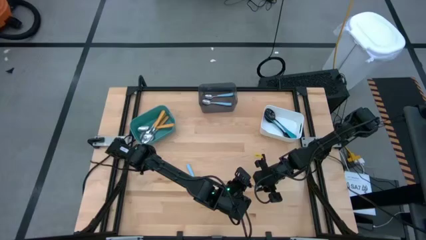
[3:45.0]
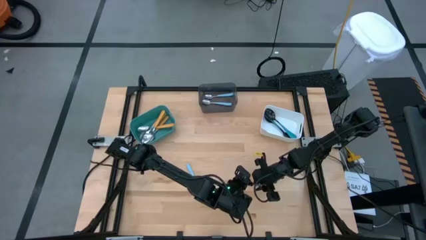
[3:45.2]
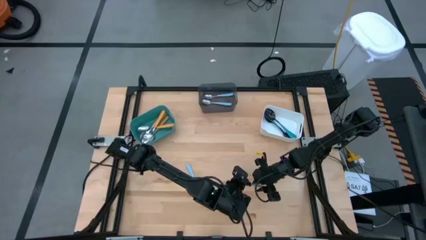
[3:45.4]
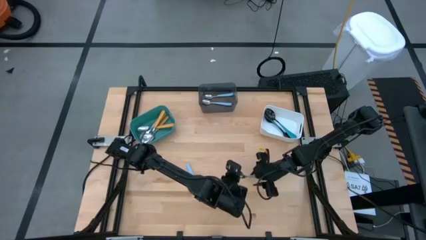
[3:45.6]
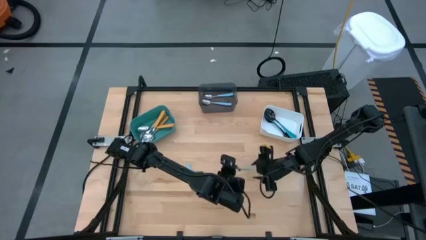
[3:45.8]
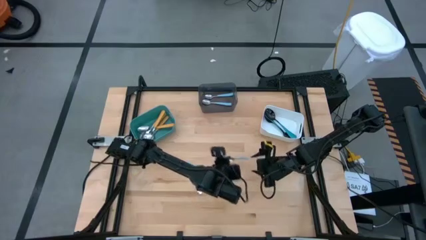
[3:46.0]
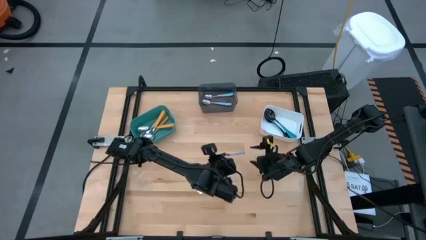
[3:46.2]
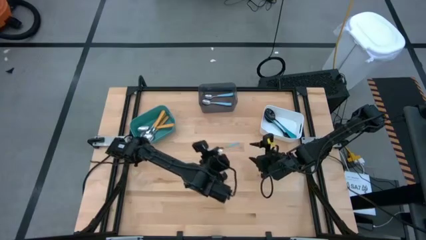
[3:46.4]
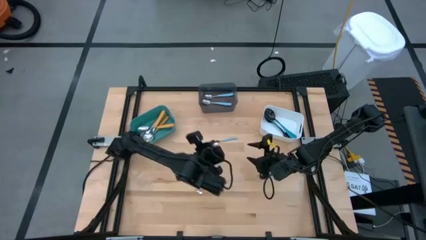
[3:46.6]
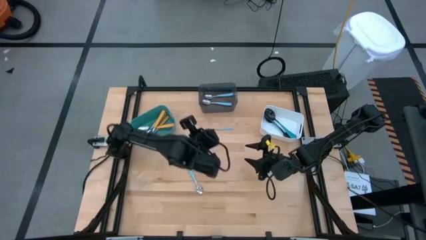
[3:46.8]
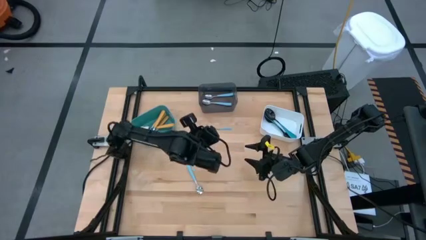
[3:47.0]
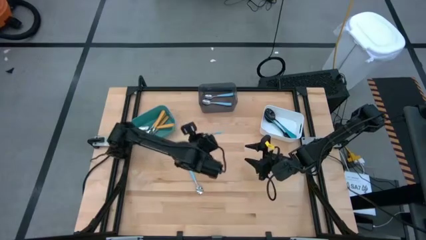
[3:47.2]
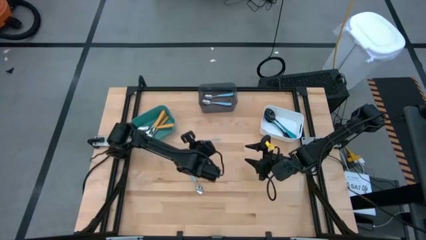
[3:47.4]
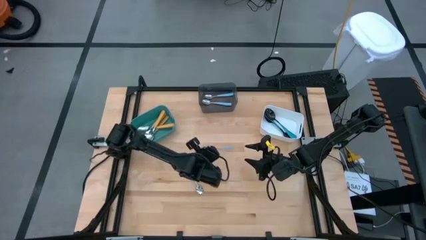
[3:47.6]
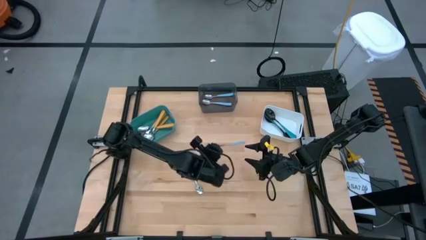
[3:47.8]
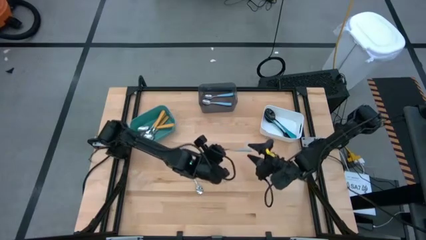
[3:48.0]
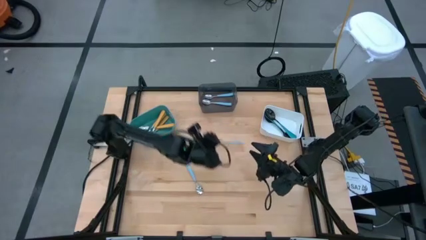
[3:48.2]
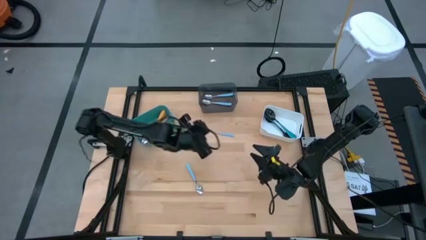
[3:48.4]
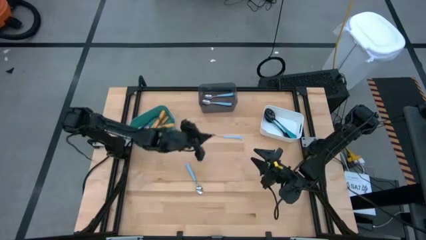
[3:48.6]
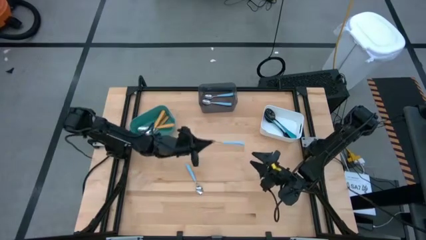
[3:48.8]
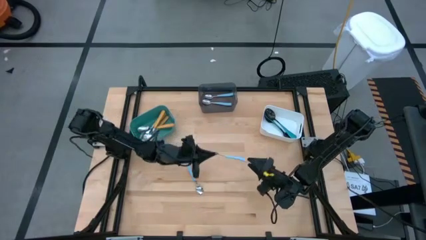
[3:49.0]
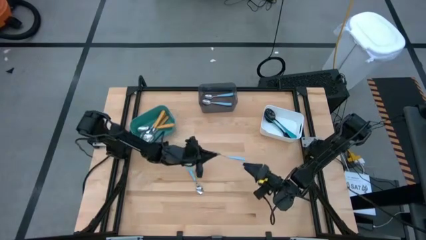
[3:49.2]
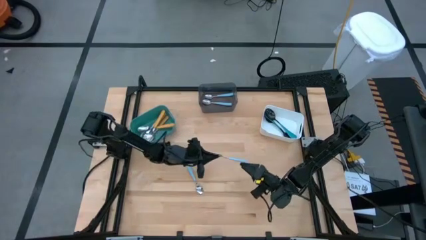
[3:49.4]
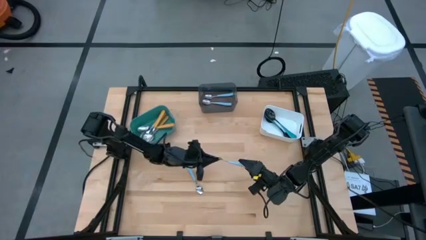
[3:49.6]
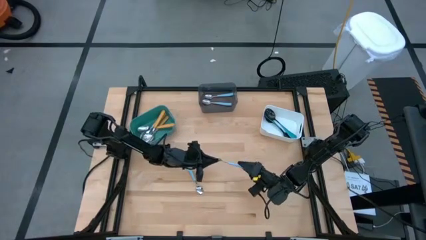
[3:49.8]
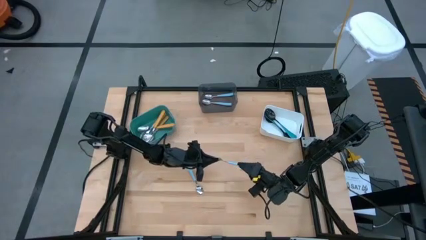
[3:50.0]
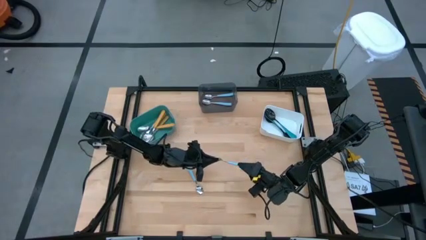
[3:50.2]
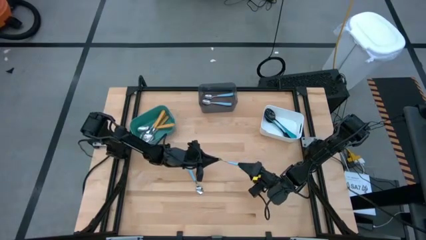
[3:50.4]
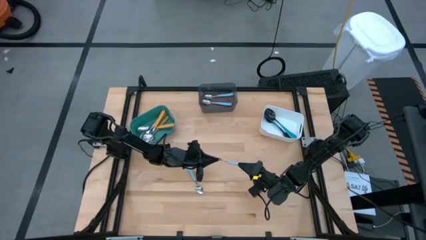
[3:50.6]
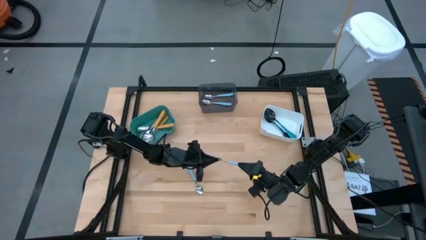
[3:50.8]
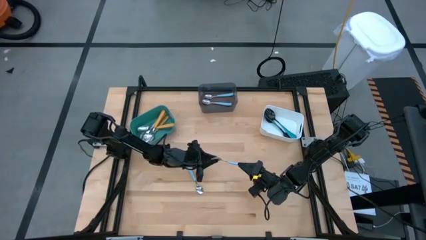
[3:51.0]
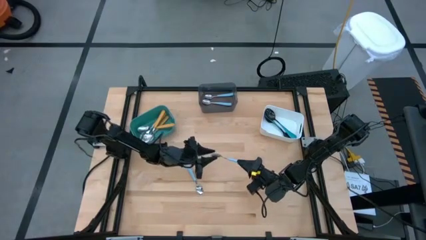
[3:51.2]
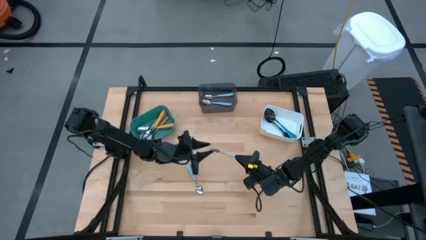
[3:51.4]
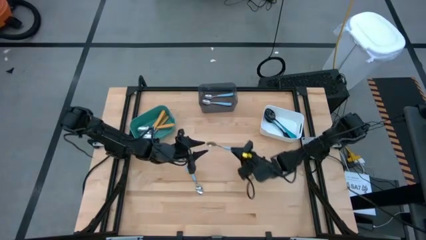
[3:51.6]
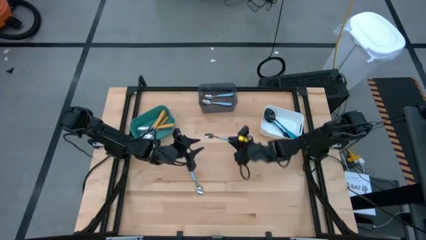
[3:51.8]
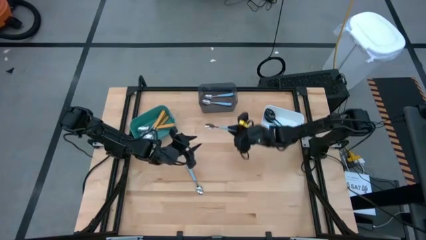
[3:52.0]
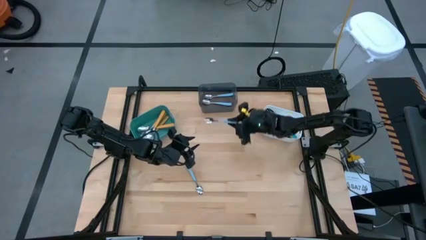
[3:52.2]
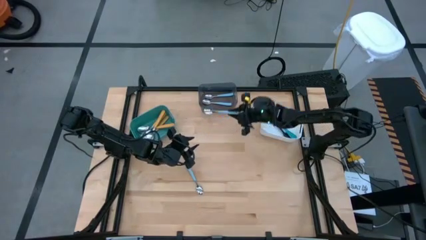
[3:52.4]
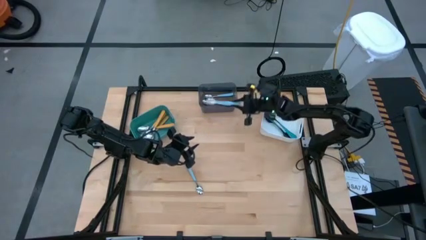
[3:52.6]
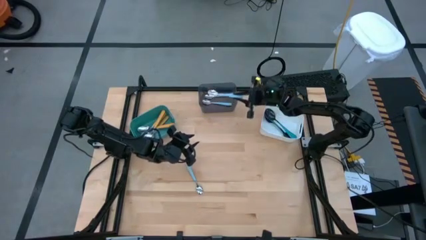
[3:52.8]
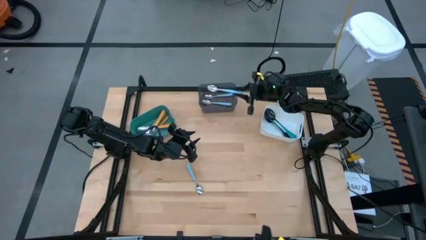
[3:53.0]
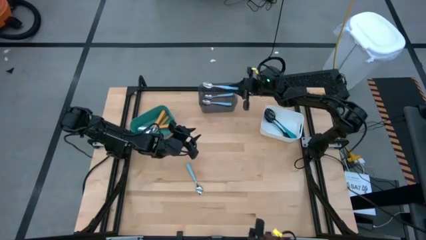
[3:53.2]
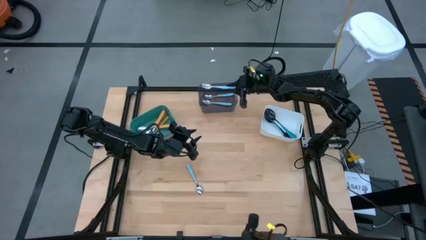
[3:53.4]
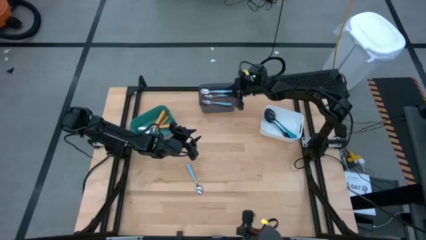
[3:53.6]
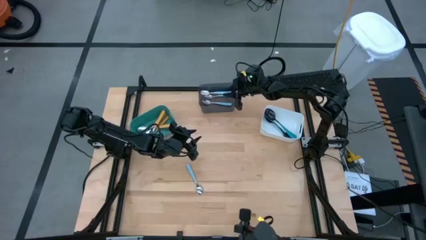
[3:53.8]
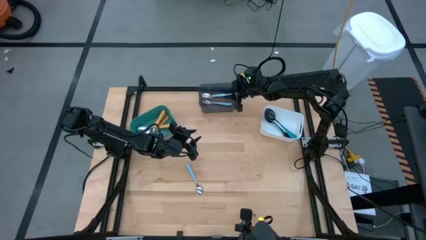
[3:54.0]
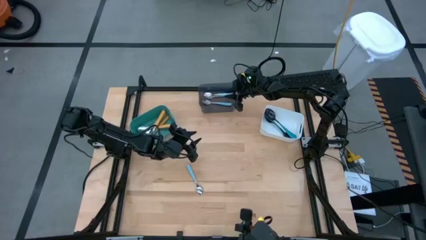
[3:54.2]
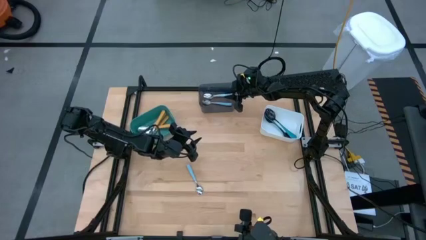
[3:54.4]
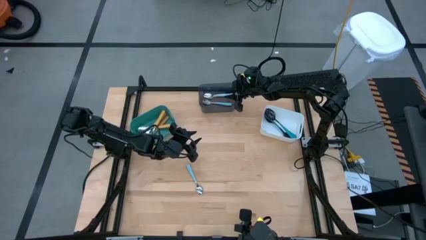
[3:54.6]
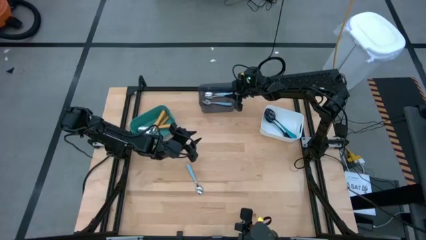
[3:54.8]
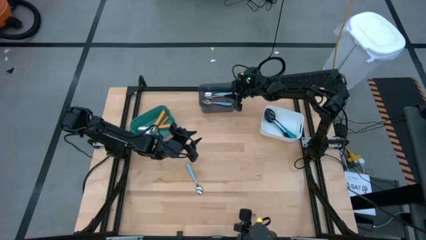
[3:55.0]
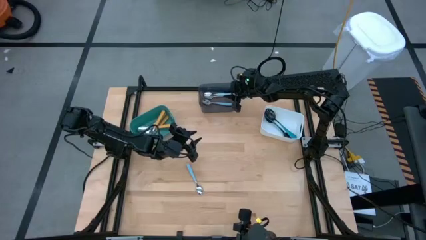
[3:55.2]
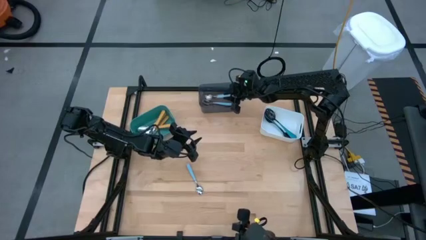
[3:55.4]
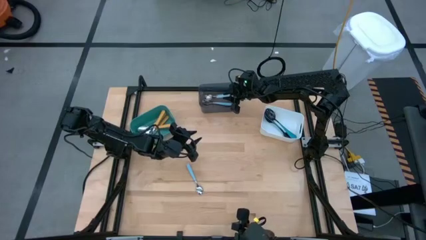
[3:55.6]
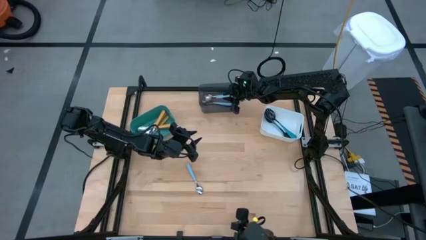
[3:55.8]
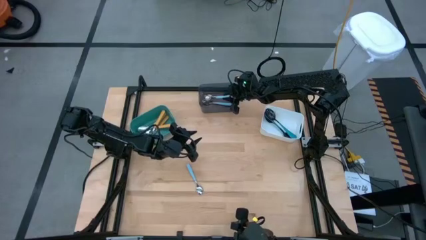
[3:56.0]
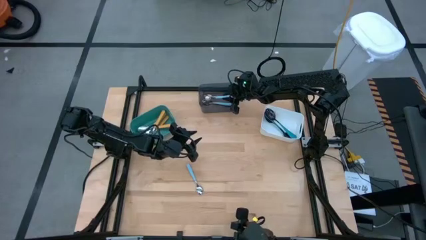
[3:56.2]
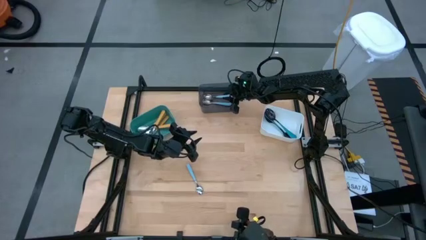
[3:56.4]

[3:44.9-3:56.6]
Task: Sort silverware by color (type)
Put the light blue spoon into the black bin
